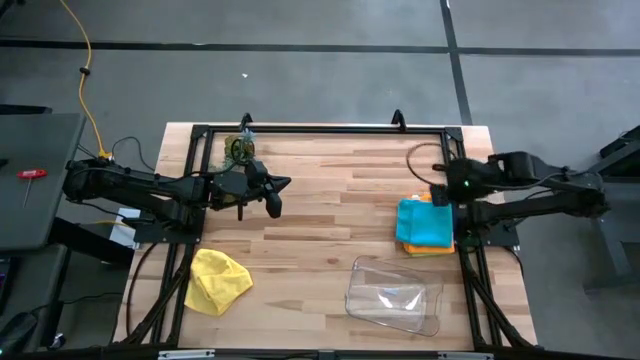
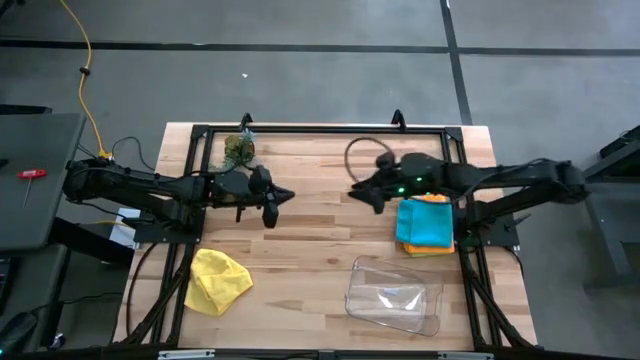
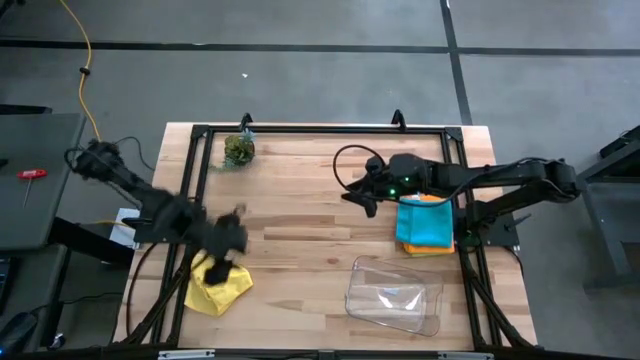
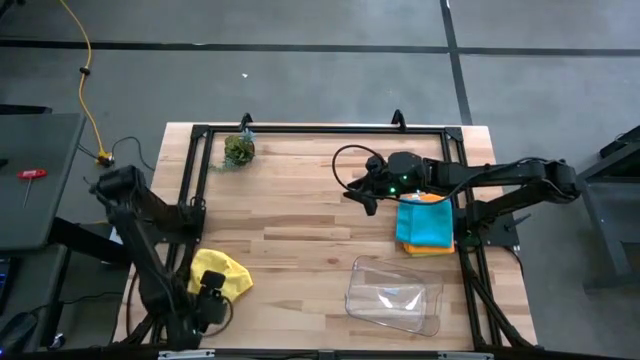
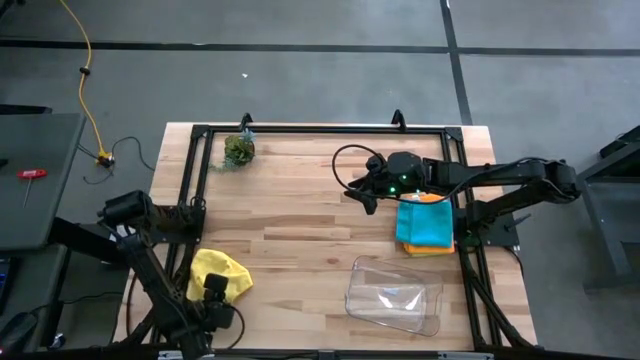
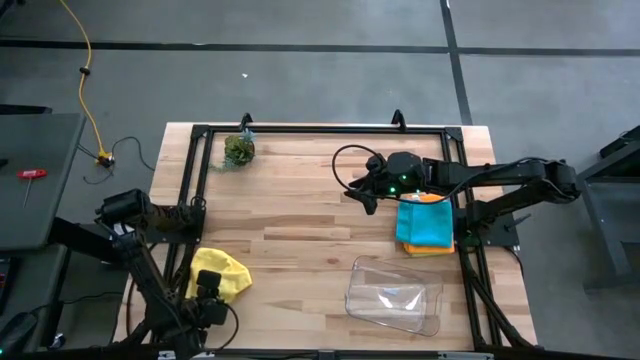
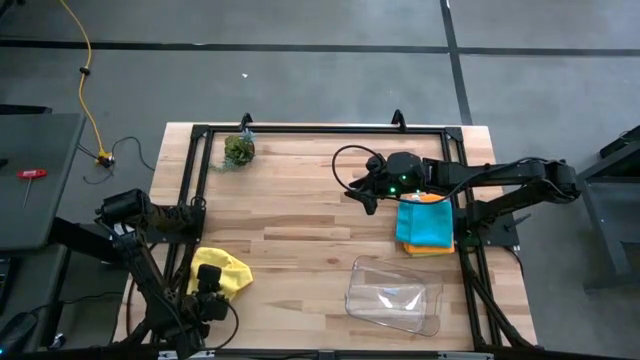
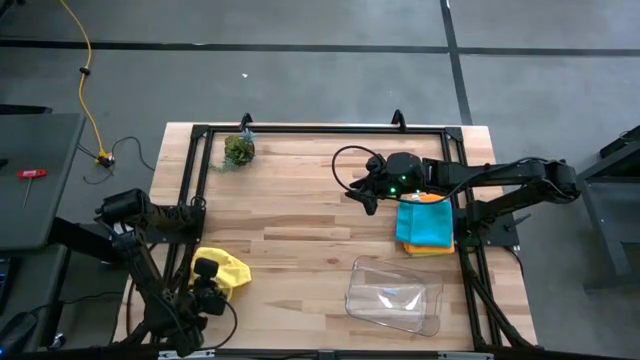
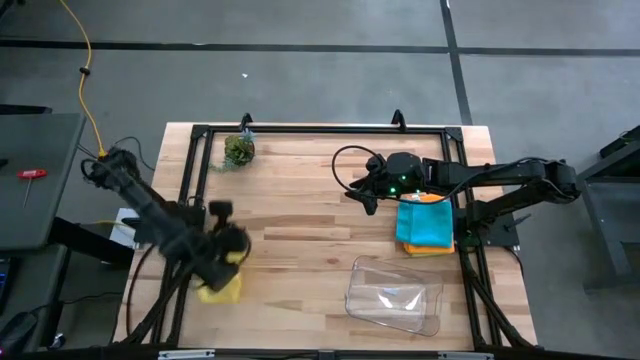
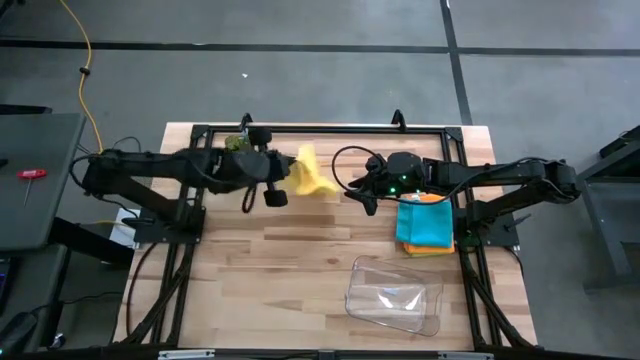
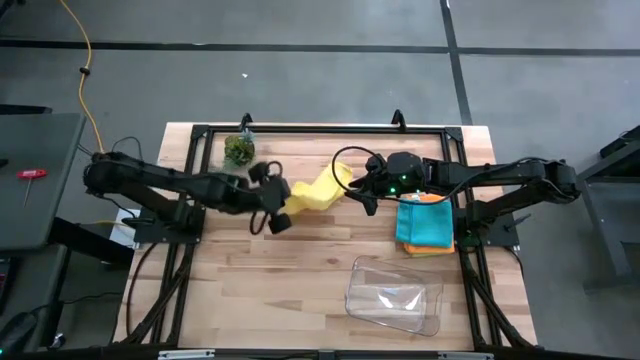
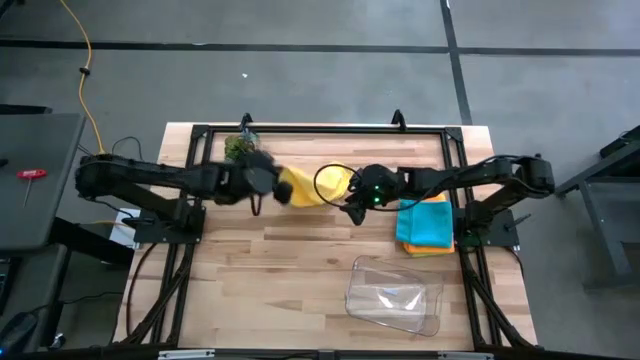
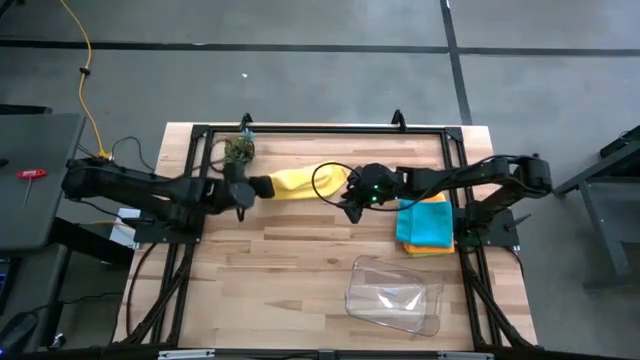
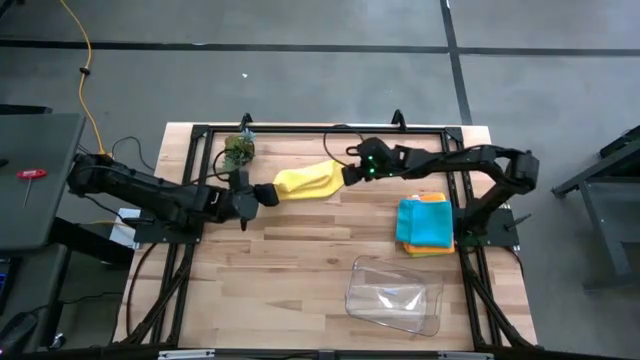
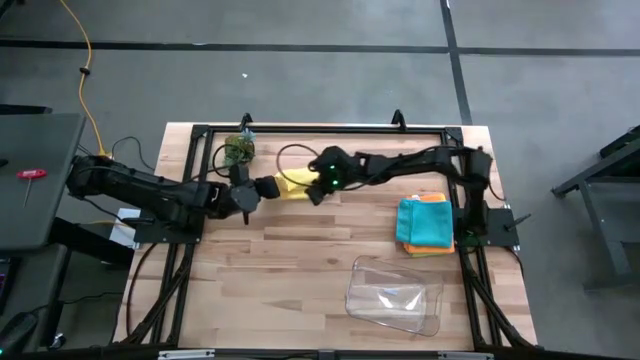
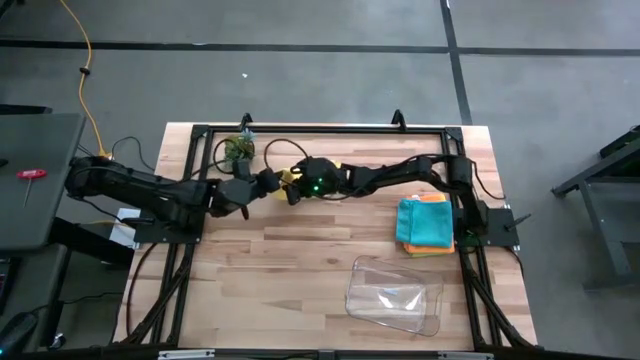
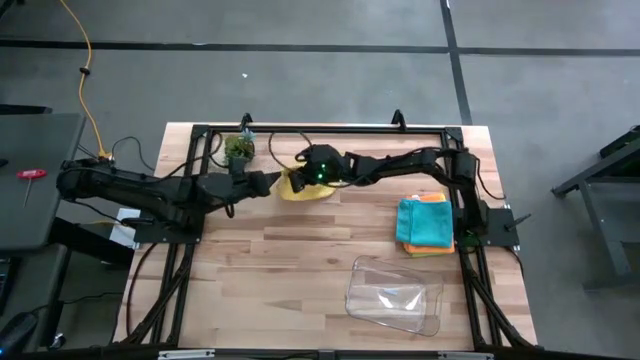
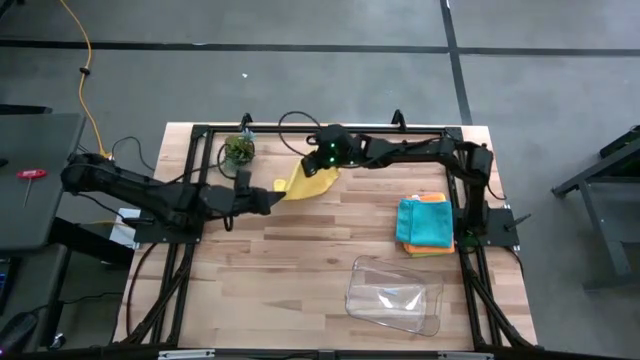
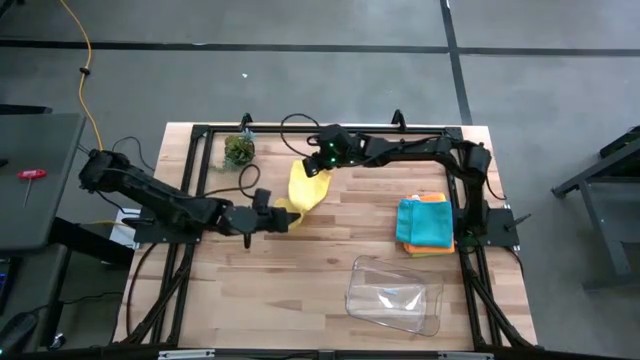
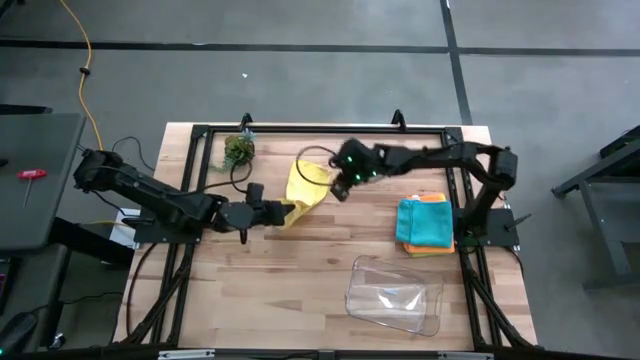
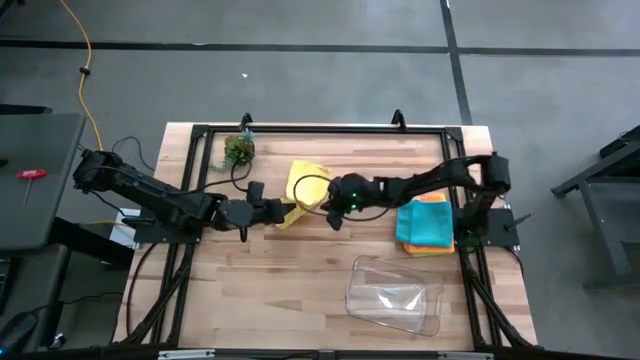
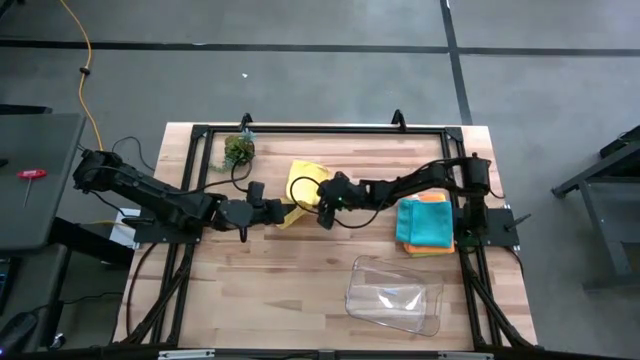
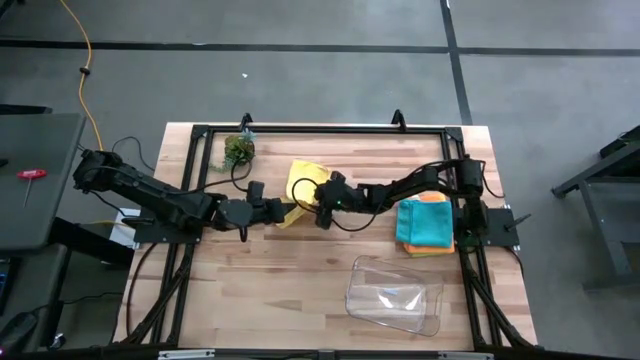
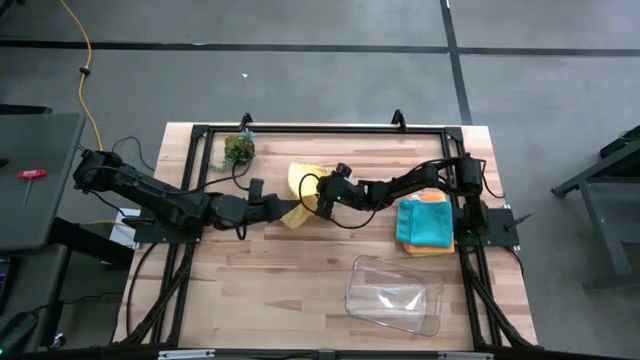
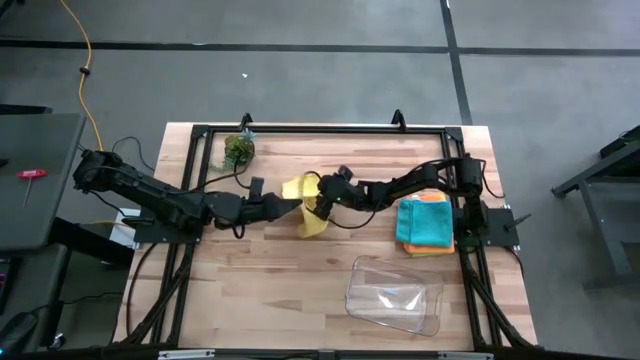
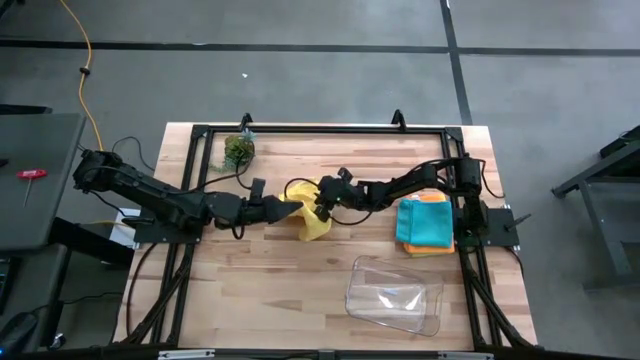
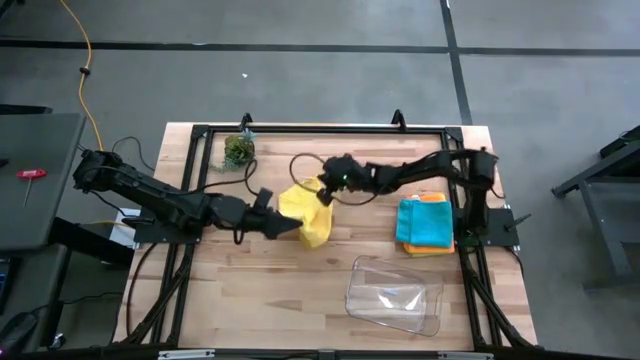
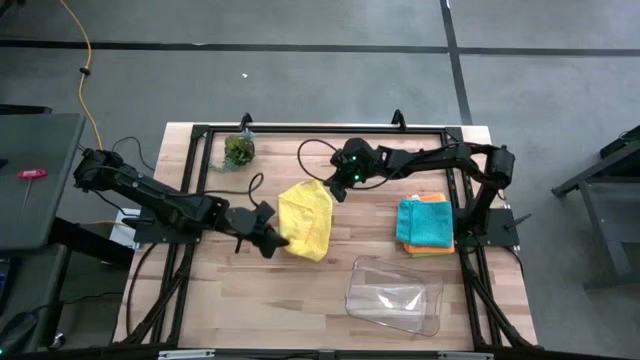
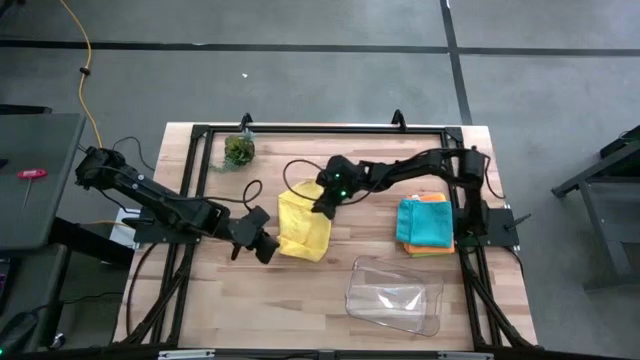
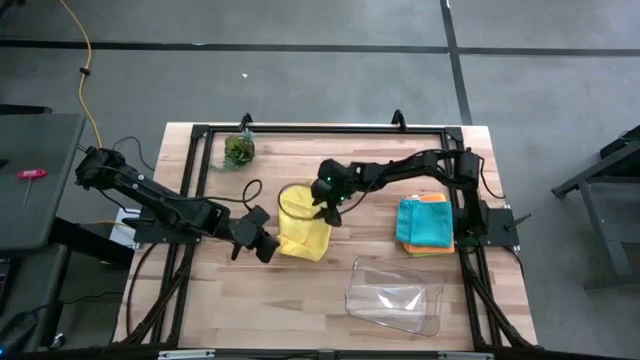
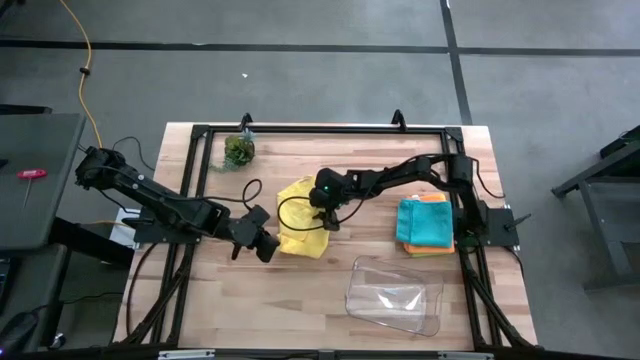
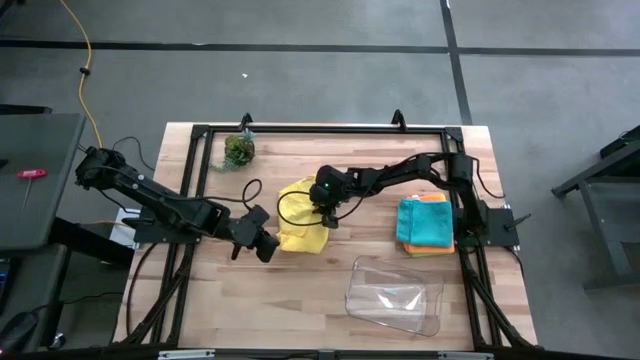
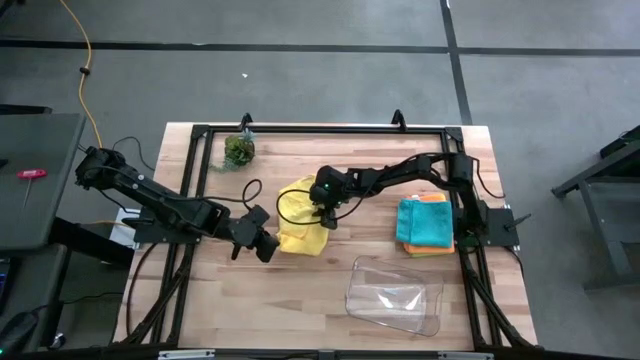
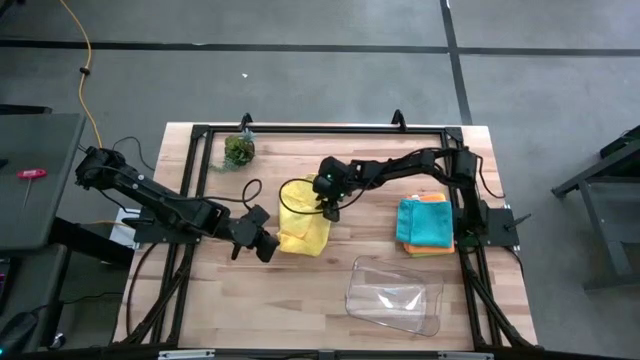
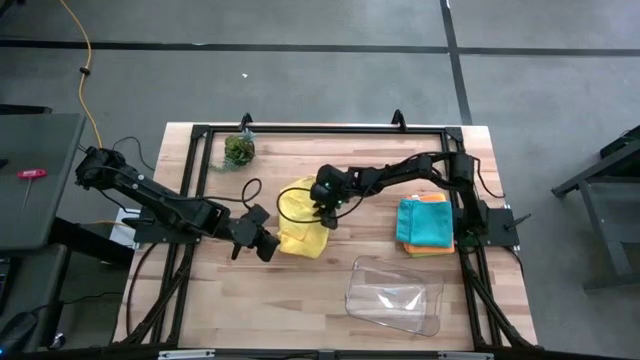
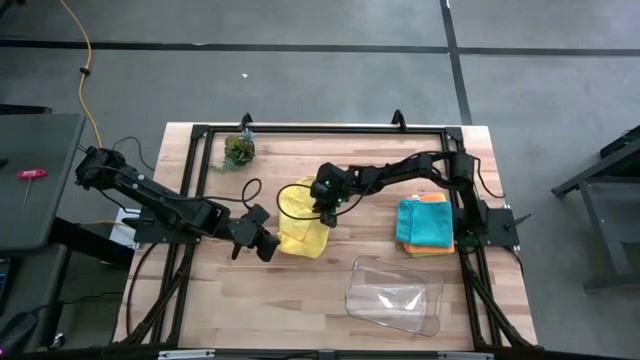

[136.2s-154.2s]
Task: Fold microfiber towels
Fold the yellow cloth

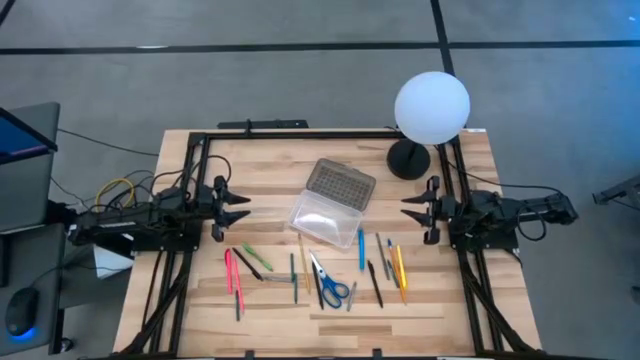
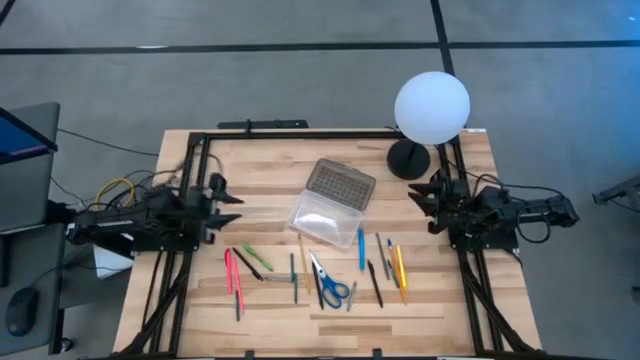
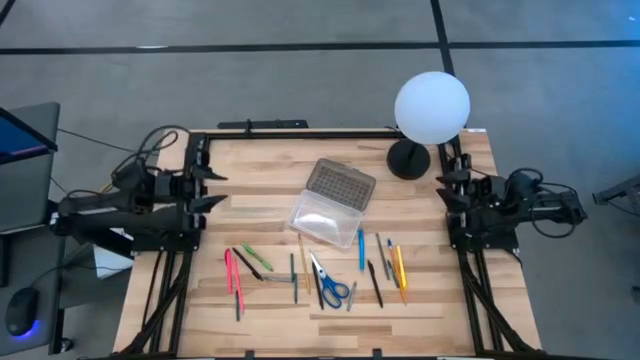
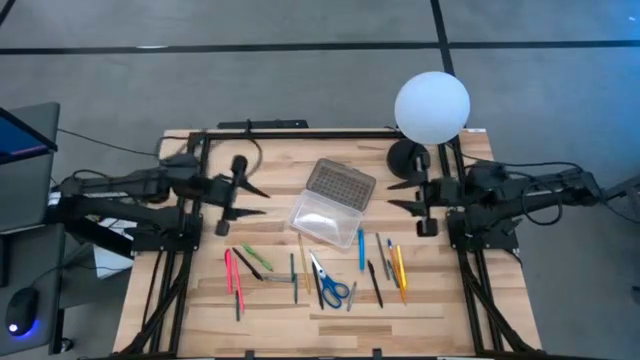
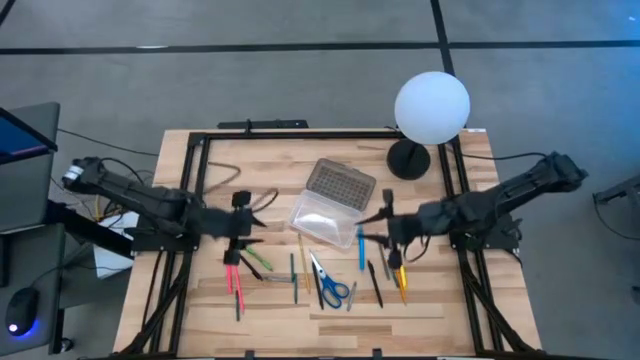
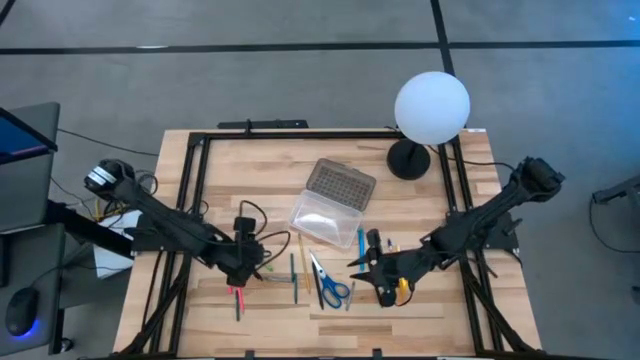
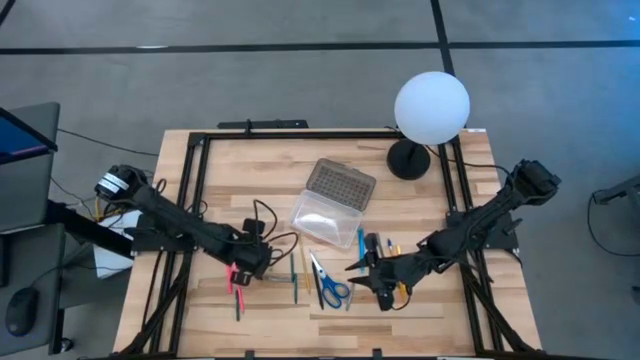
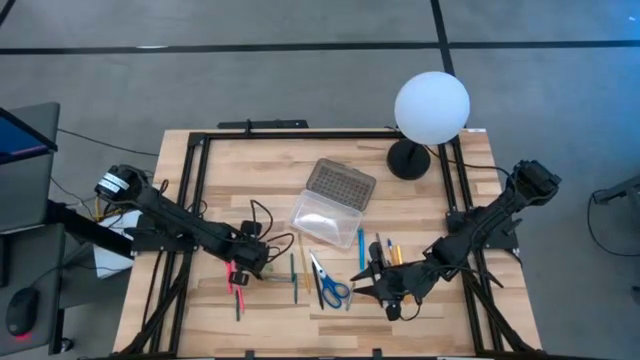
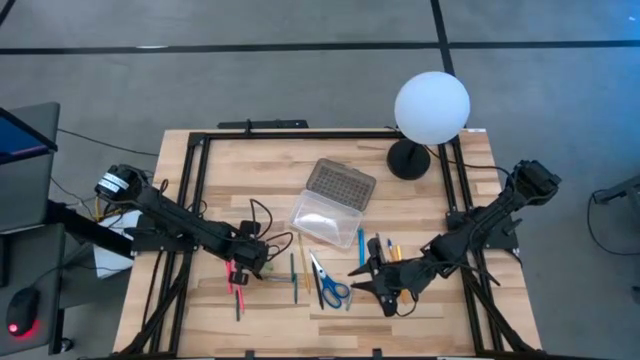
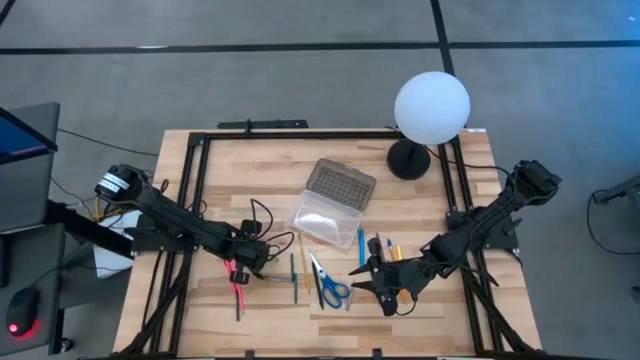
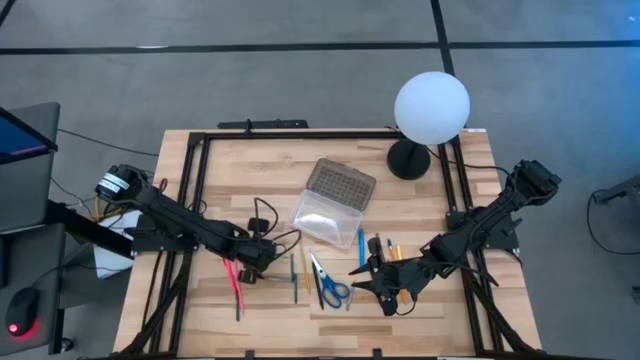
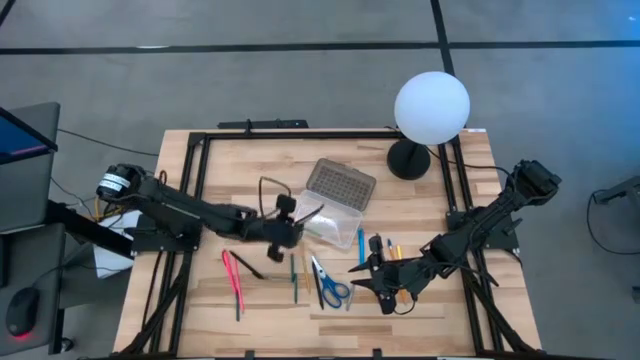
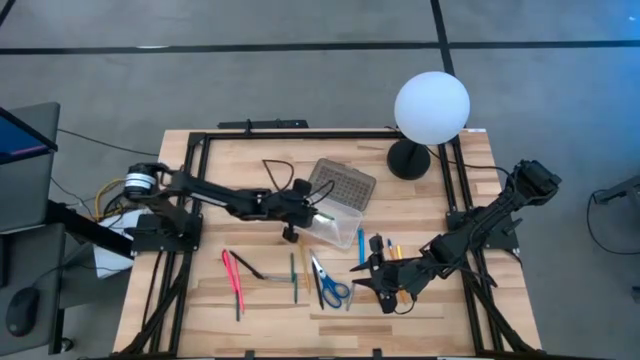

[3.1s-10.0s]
Task: Pick & place school supplies into a supply box
Put the green pen into the gray supply box
